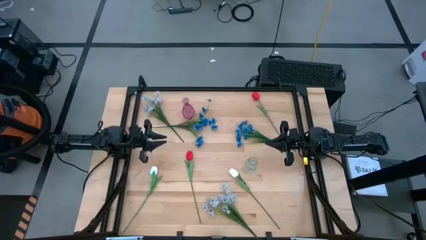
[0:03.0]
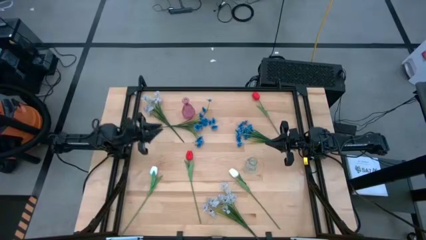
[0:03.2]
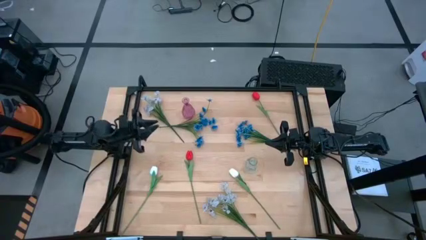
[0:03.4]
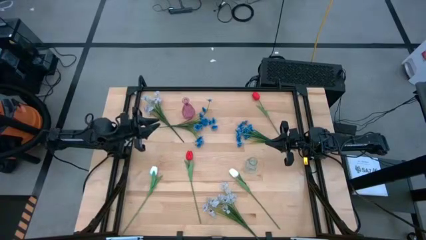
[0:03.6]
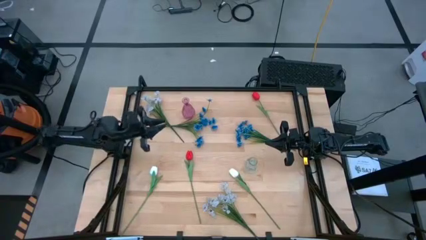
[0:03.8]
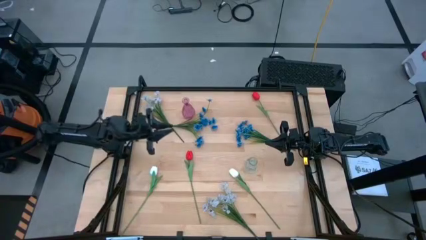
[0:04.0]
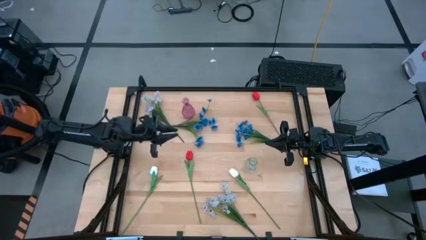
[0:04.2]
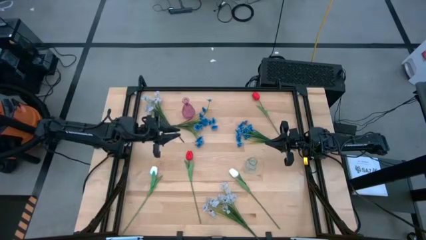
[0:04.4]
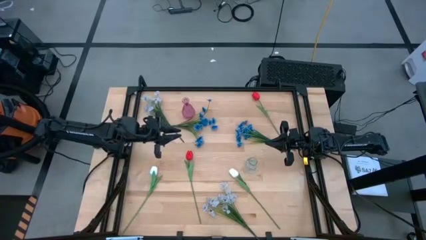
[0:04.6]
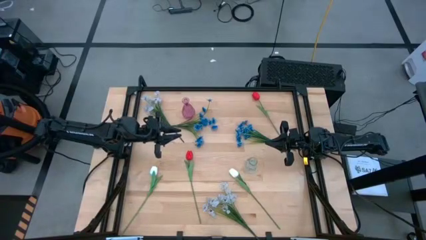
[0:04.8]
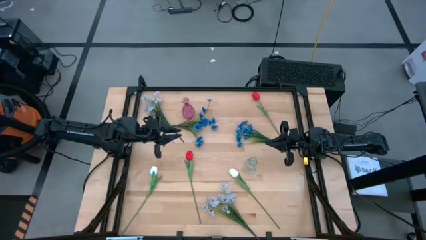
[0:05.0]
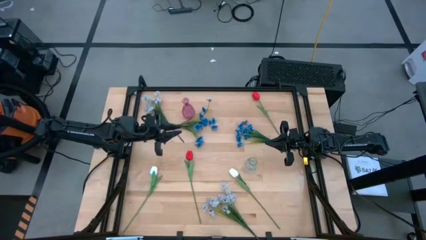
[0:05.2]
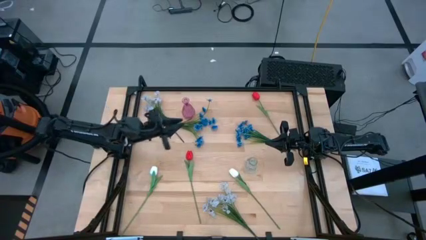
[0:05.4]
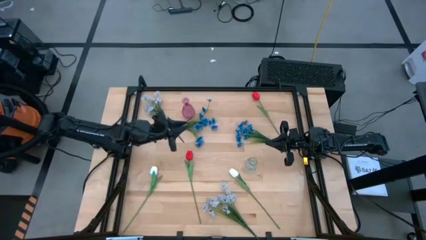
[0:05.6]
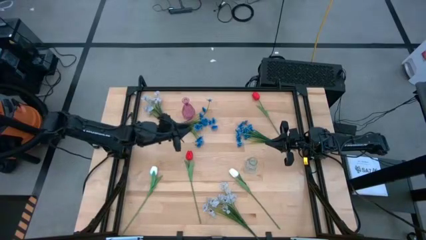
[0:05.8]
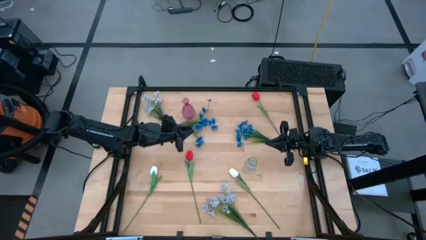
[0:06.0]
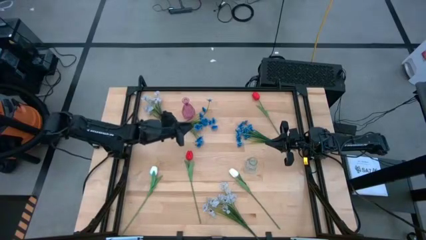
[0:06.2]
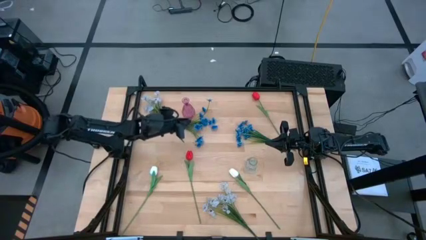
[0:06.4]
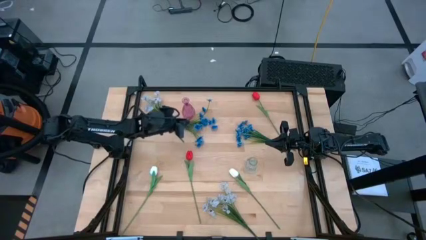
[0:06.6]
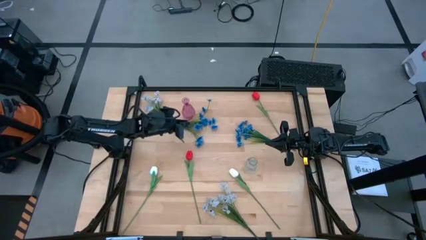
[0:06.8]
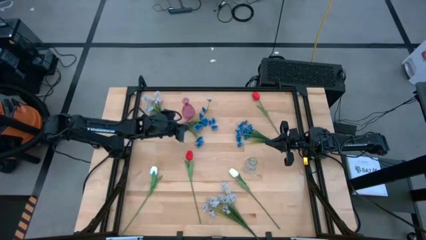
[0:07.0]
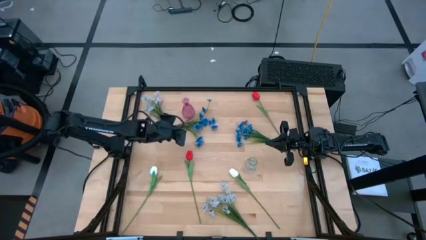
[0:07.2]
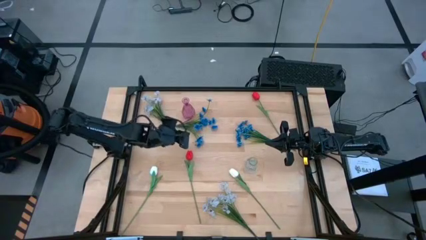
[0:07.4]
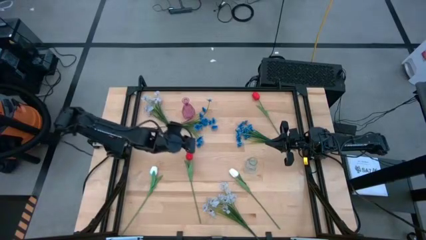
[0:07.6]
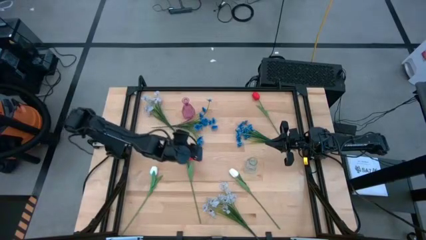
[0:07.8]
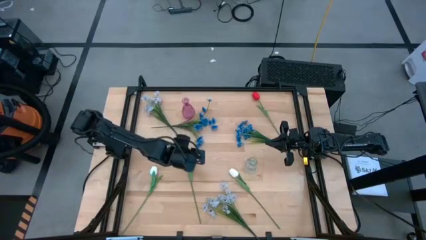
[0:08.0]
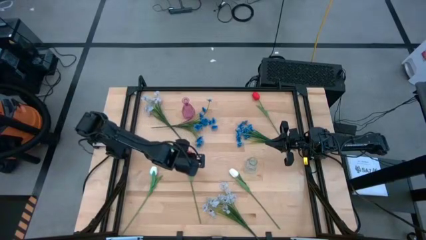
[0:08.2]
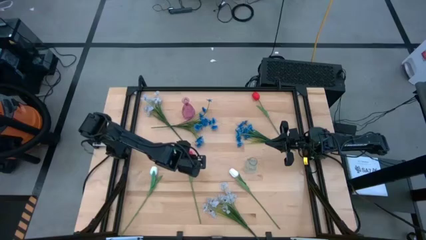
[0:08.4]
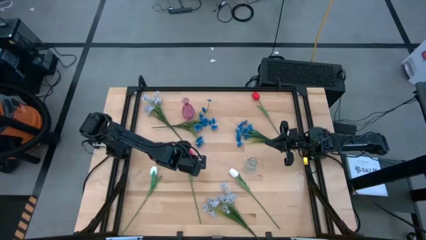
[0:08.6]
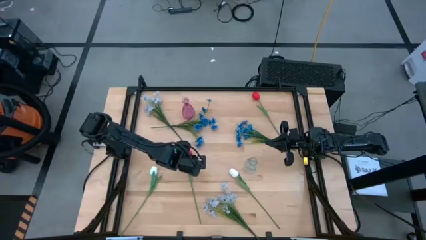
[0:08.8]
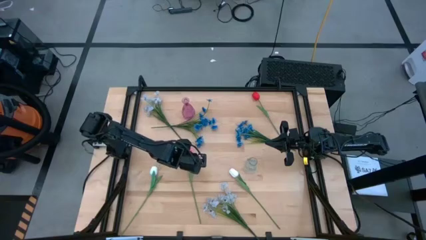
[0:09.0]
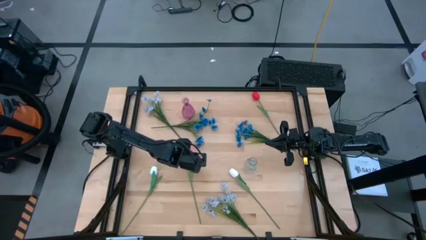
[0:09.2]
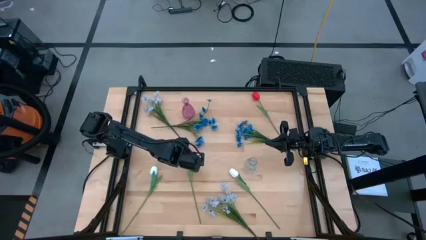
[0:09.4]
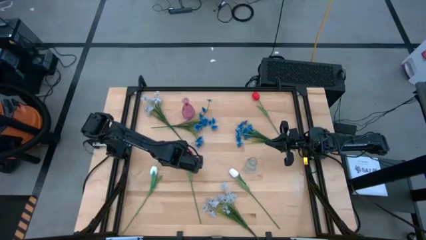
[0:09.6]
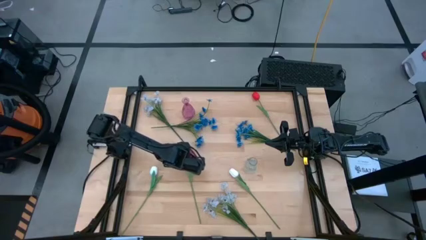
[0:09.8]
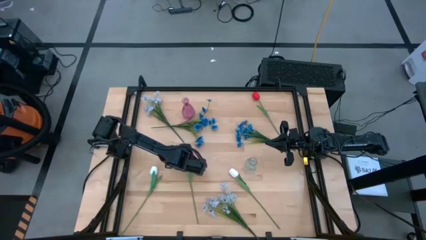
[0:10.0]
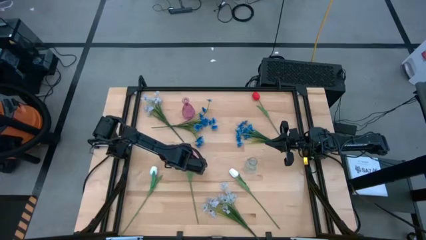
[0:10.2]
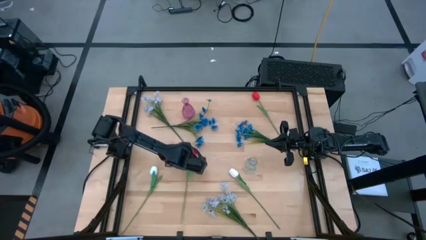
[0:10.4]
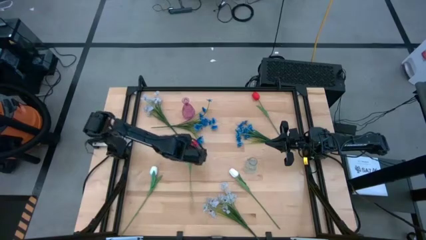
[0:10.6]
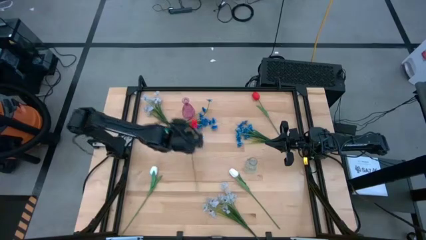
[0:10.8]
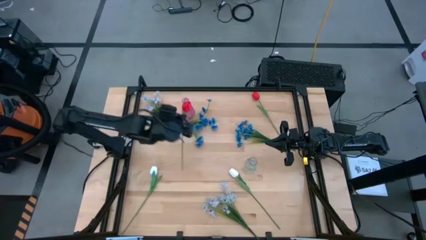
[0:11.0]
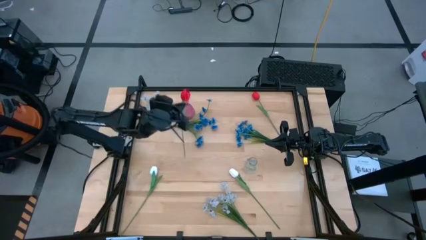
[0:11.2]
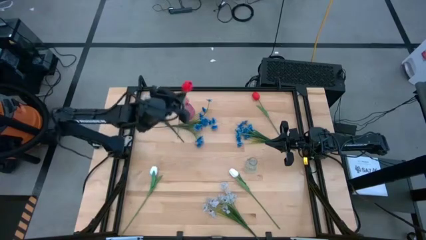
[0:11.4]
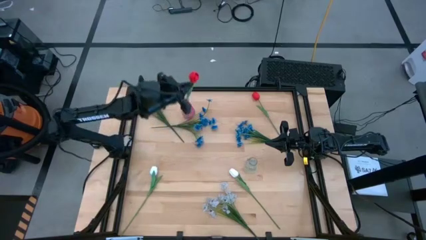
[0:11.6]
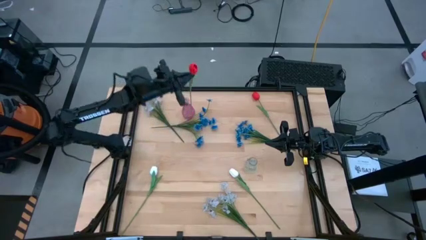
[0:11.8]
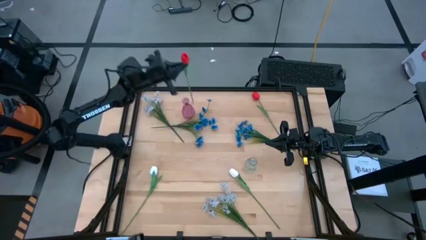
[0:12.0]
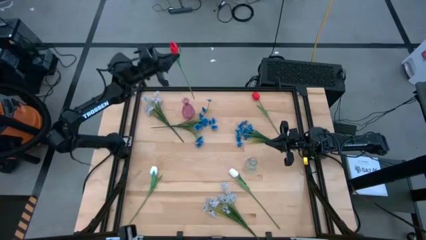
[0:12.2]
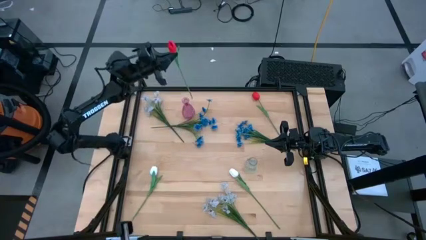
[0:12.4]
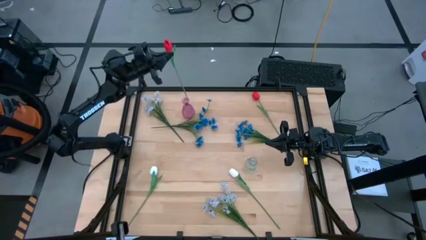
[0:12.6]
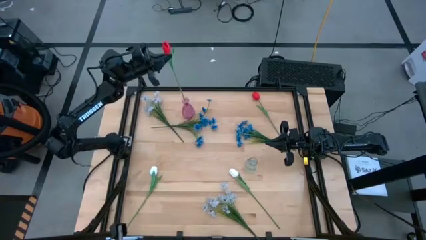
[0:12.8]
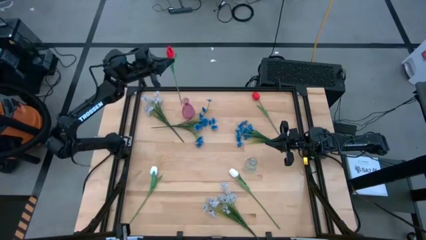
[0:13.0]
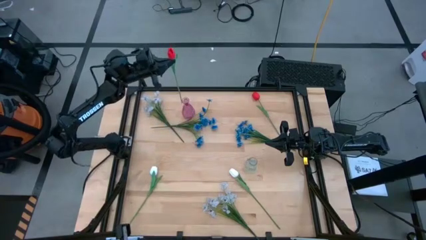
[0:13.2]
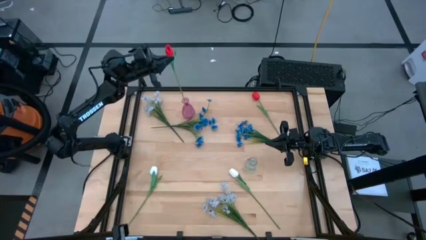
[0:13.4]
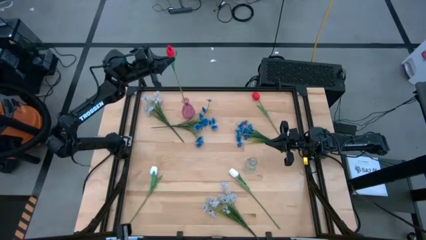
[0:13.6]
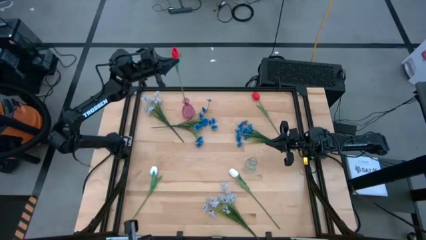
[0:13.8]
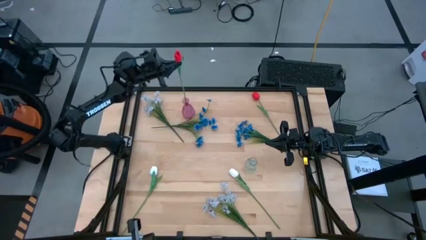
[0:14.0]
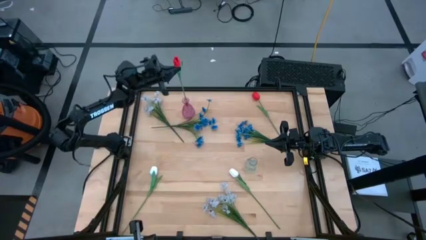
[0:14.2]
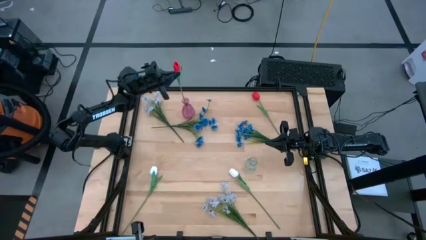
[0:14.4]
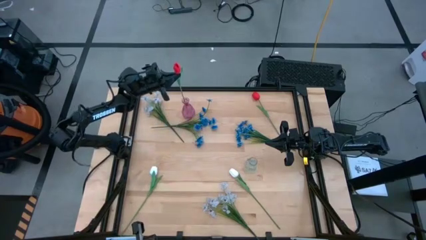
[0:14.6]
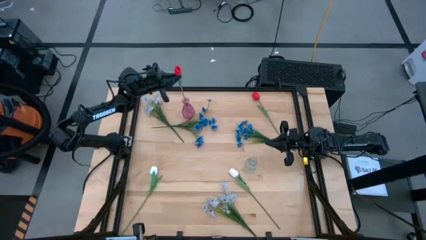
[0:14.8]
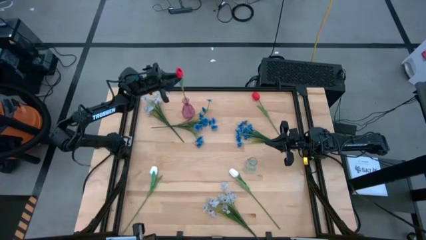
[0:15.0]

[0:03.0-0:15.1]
Task: Sort flowers into vase by color
Put the bottom red flower into the pink vase
